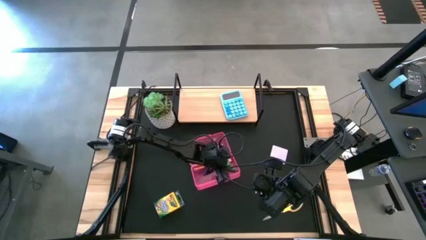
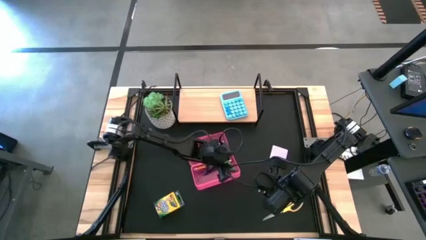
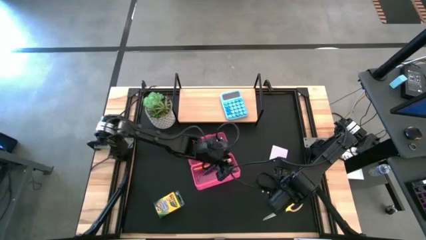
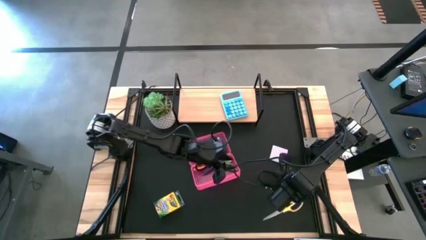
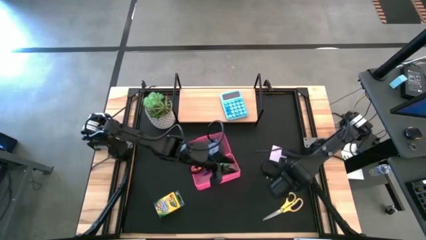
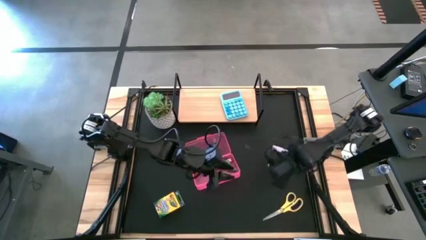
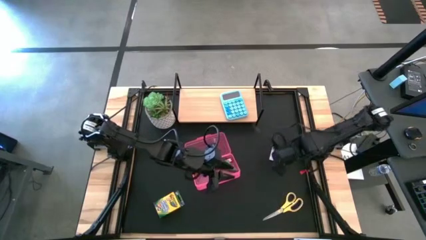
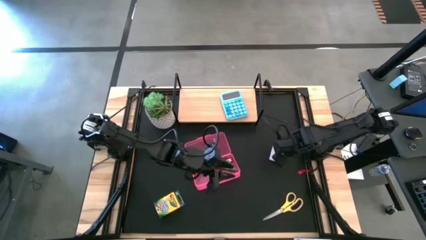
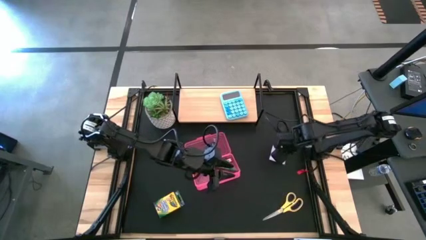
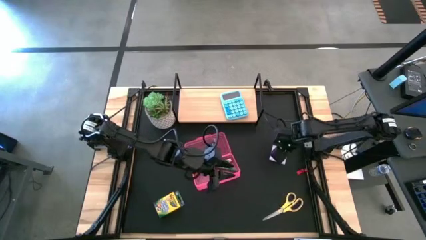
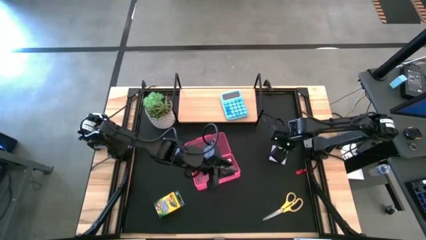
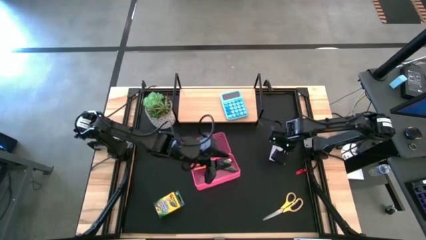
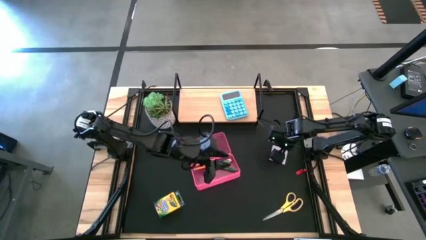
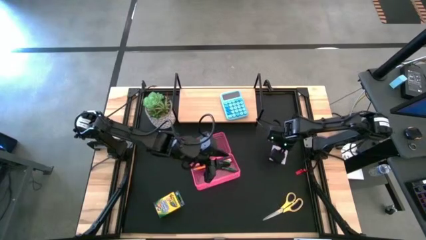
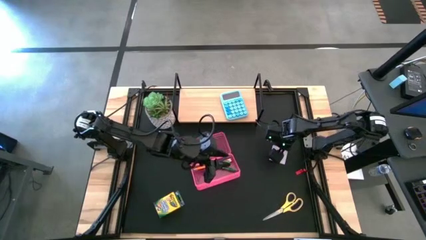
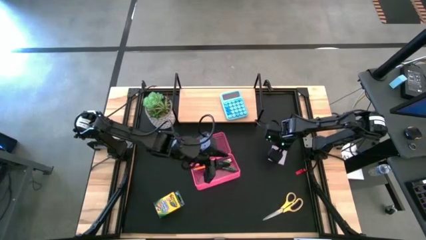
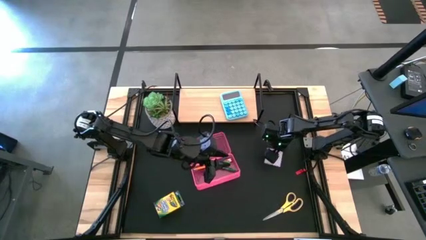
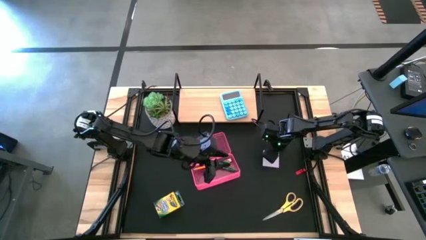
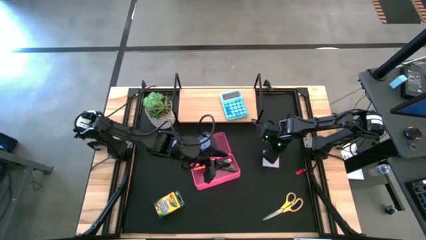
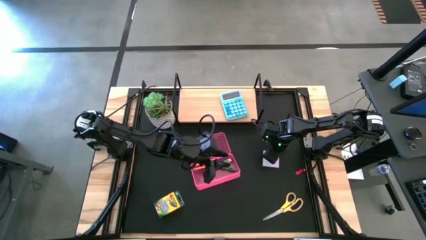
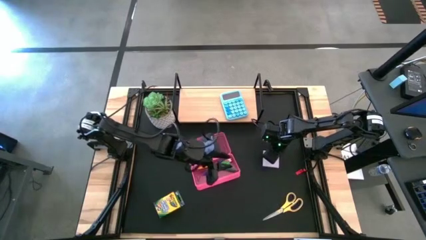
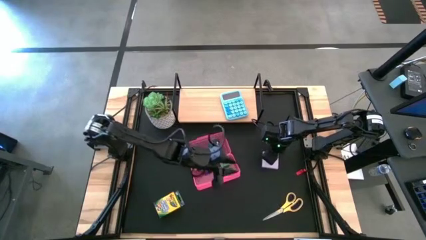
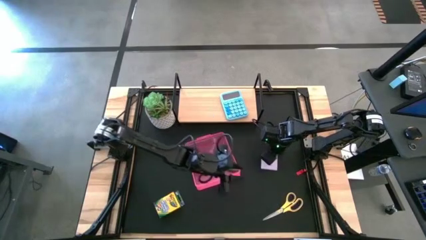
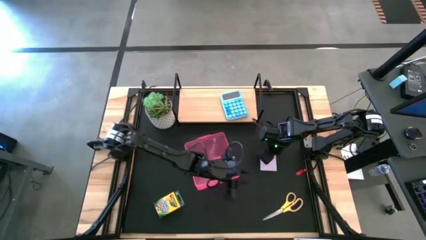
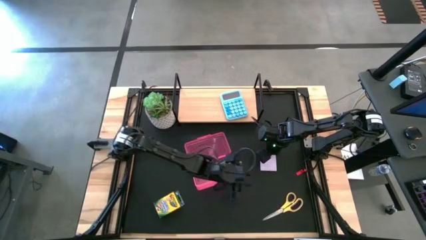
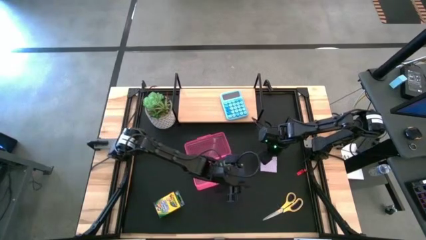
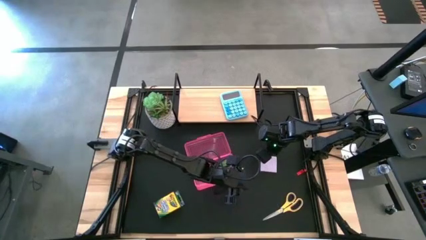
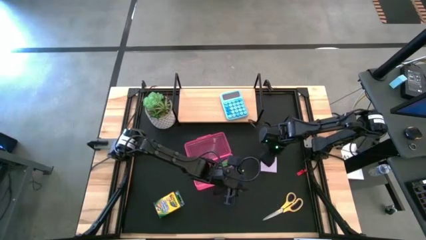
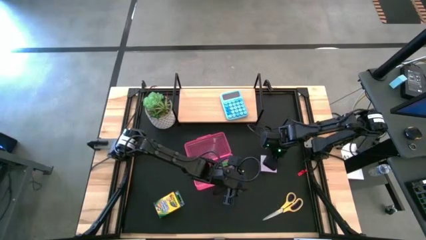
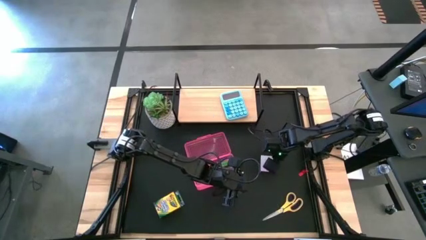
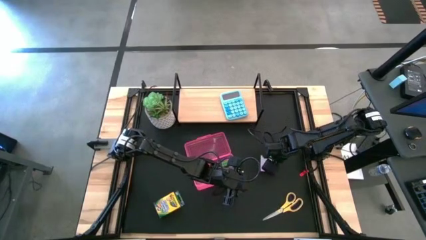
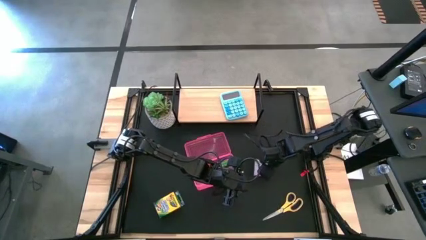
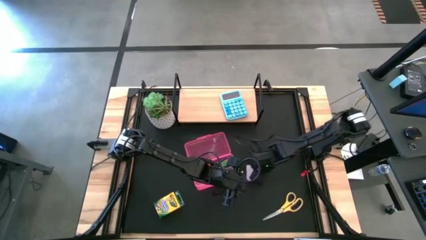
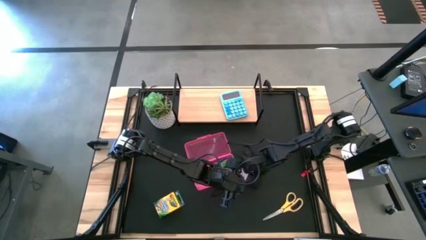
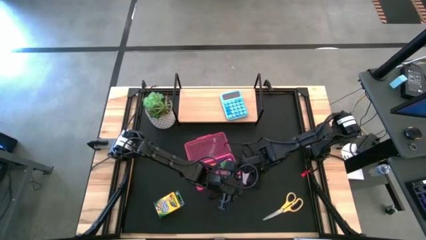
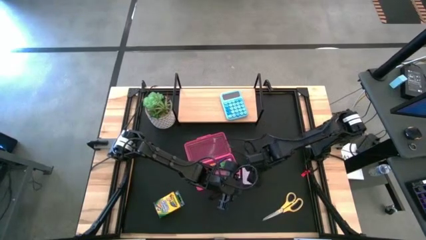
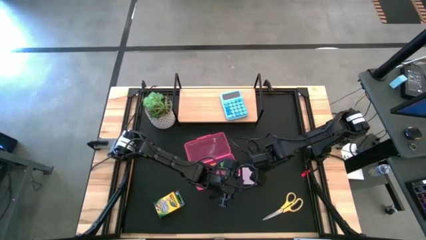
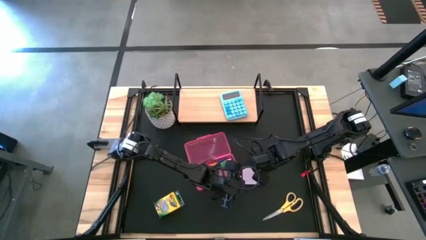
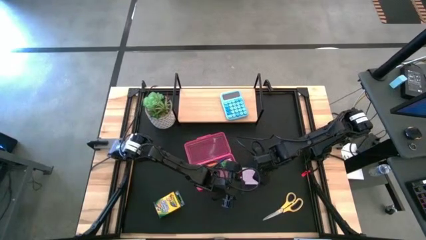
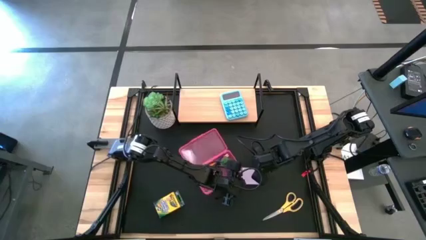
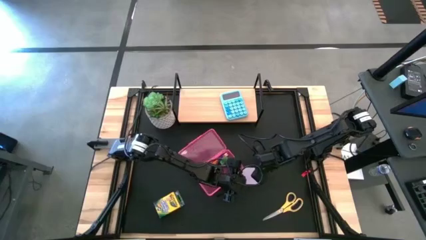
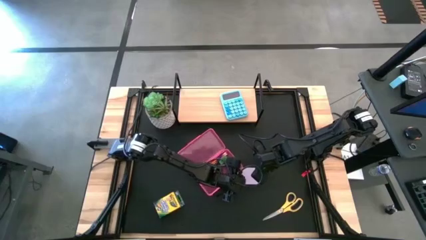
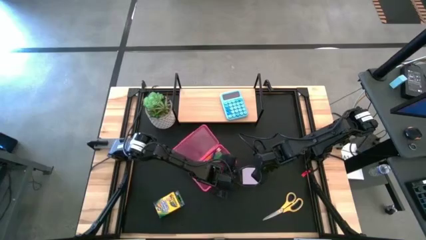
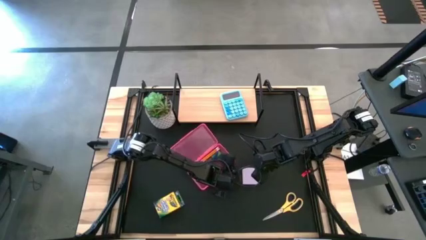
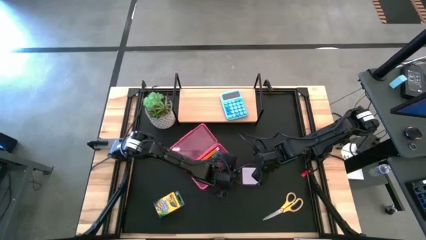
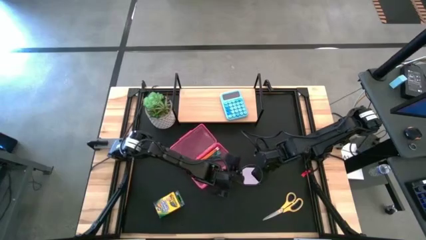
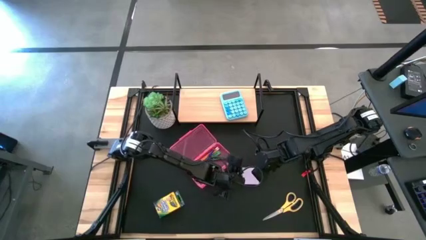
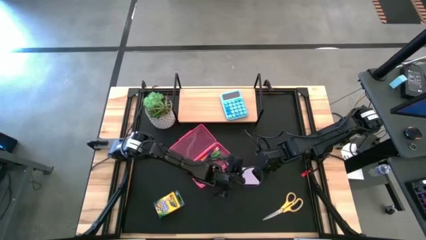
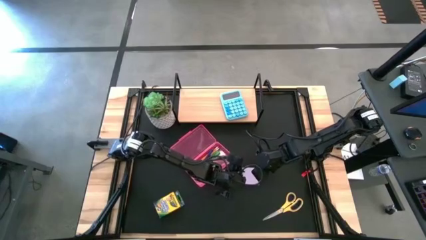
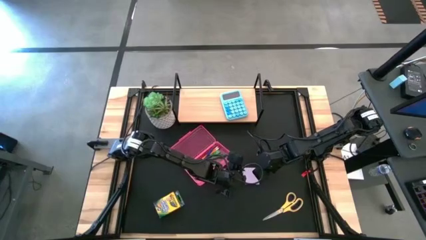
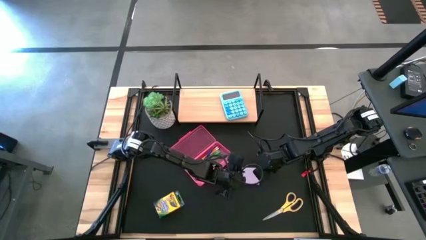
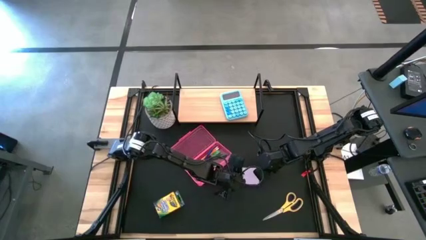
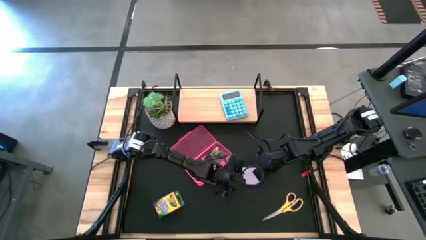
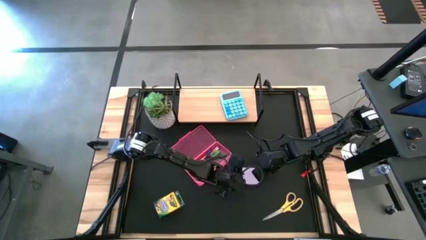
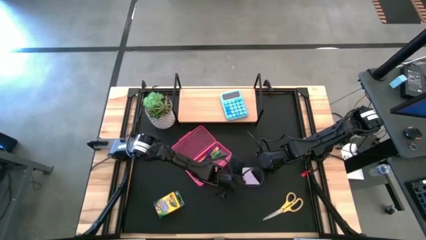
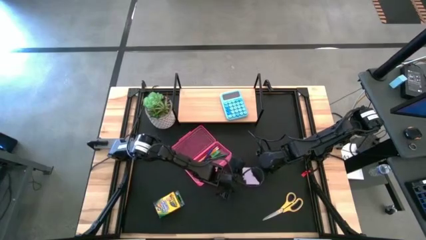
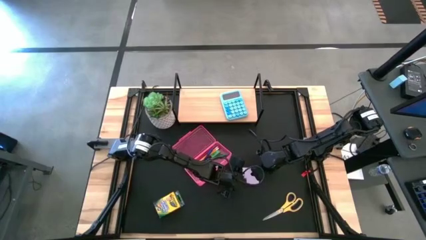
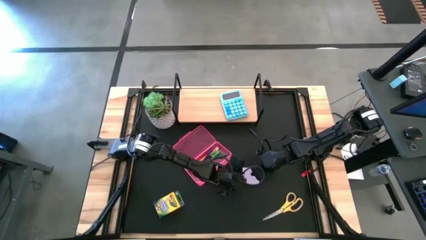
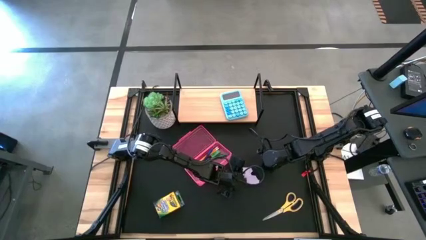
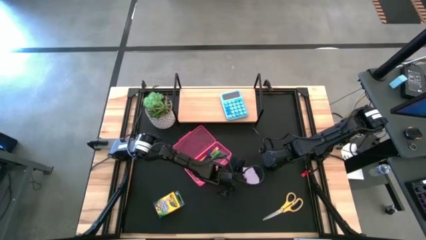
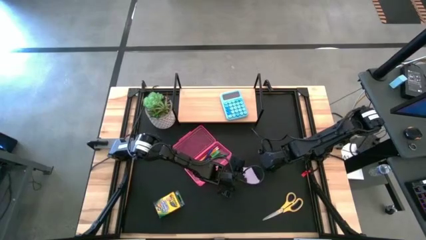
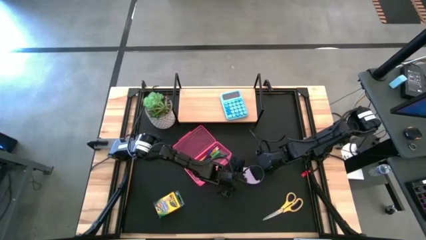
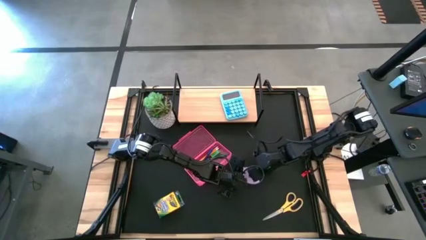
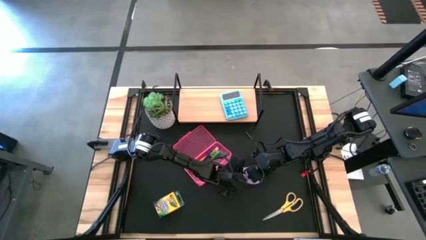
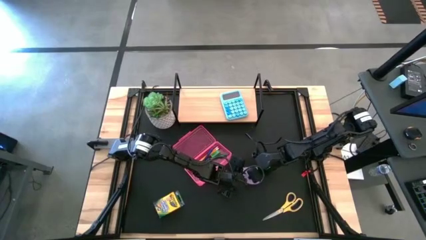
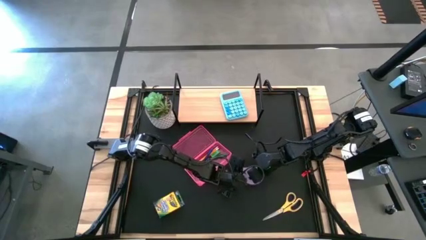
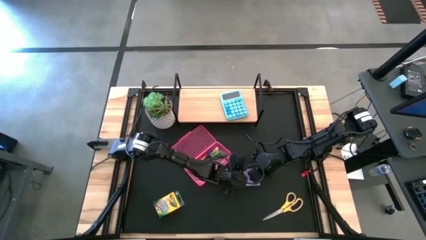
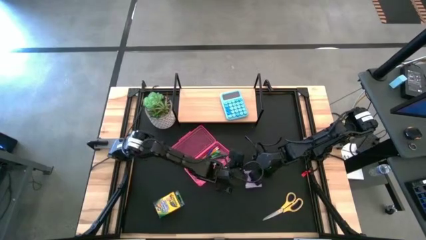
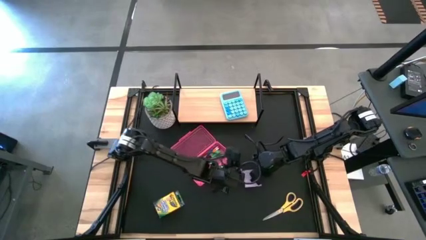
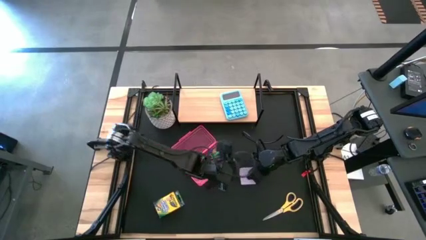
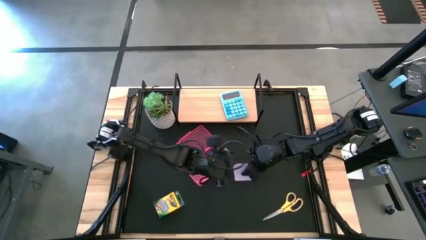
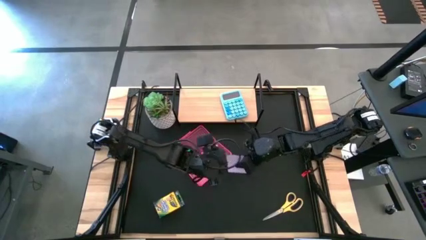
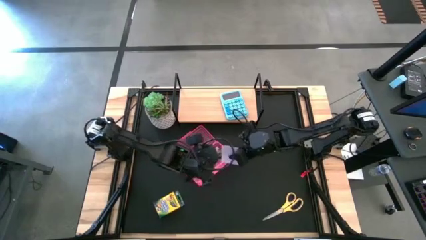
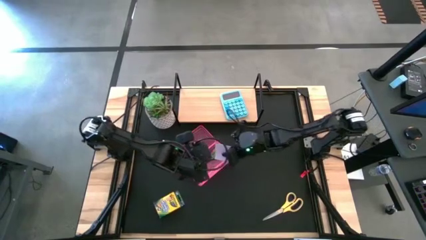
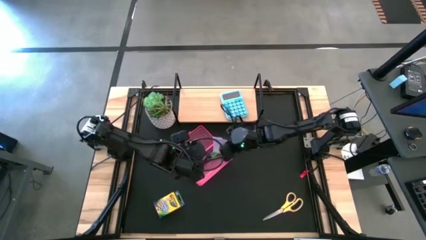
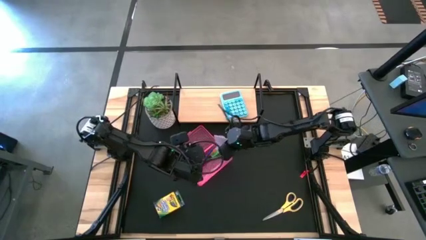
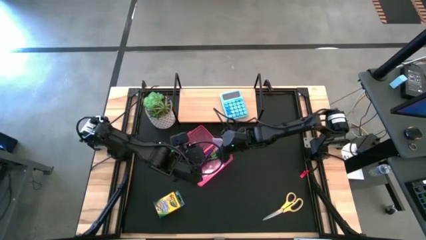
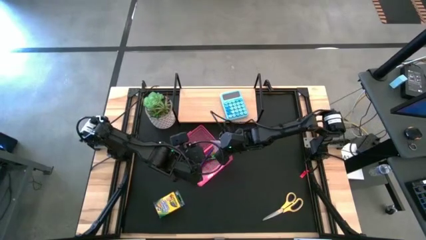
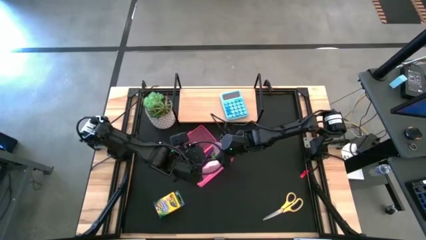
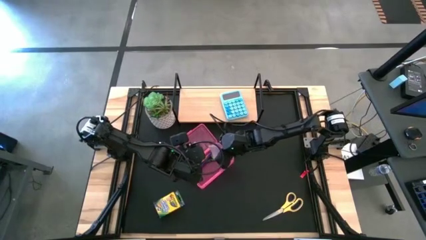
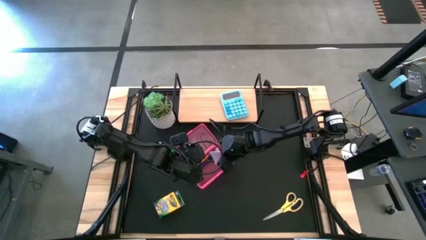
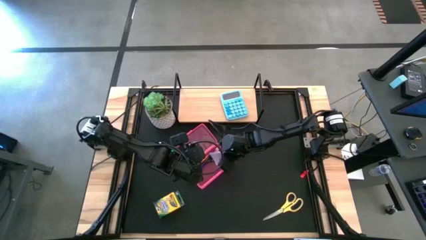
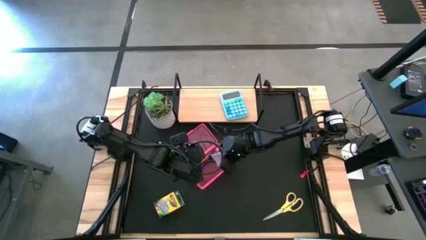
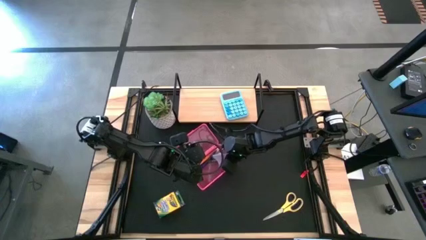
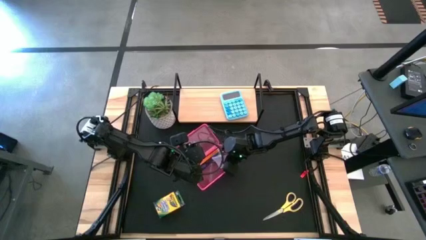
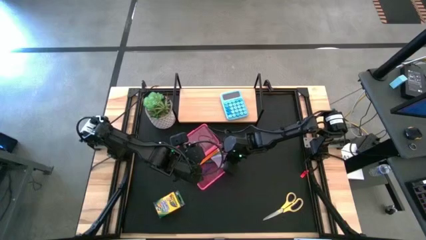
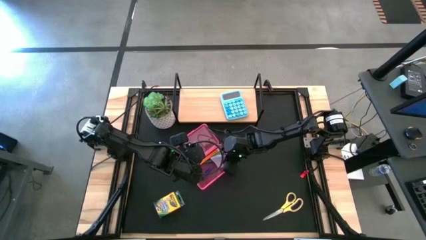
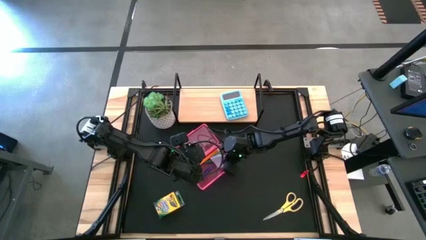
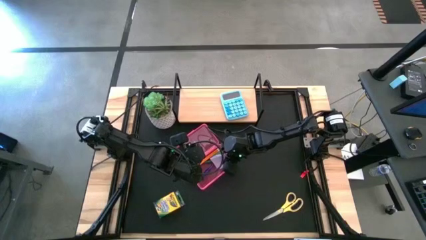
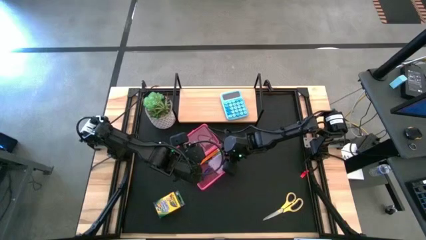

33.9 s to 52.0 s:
Task: Pack school essentials
Put the purple sticky note into the red supply box
